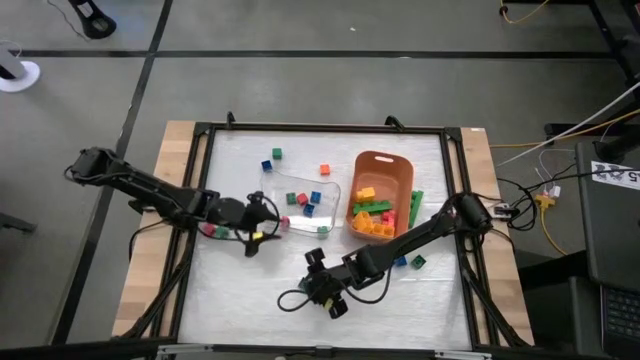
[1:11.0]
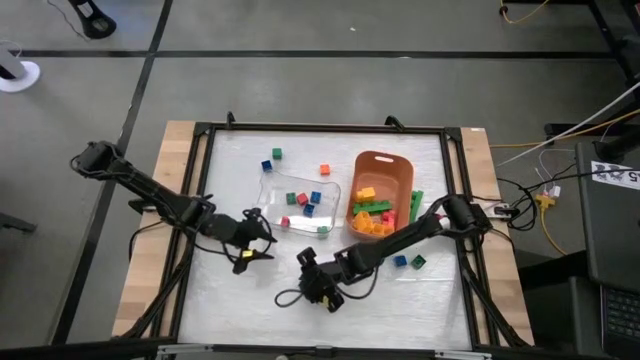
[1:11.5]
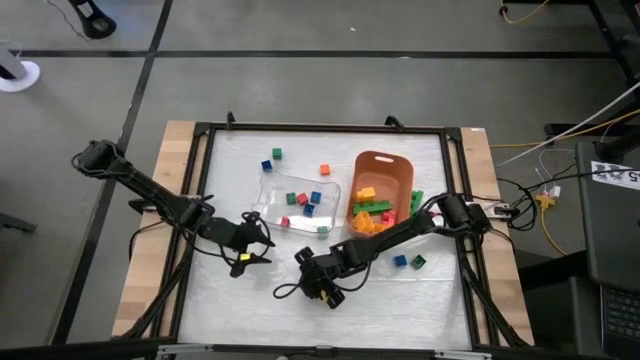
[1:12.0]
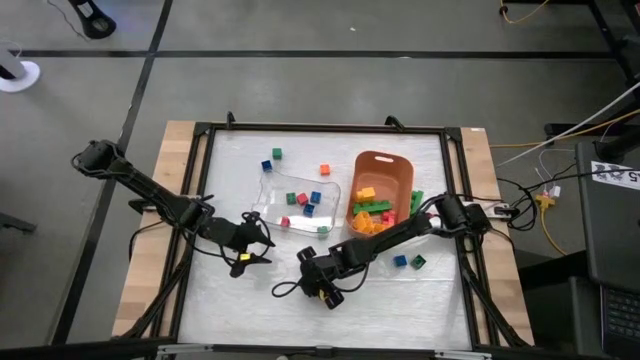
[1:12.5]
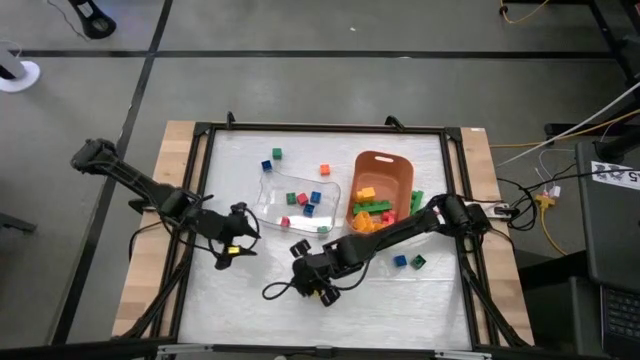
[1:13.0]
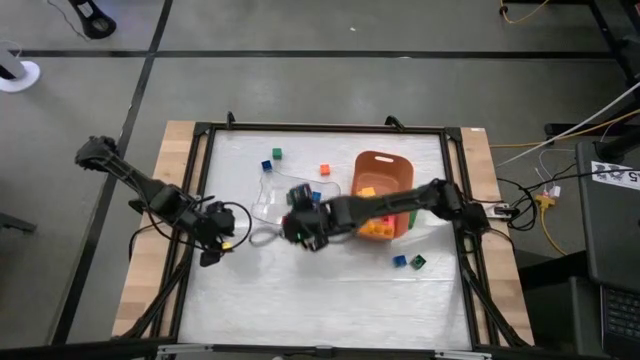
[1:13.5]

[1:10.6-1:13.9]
Task: Sort blocks by size
Put the small green game piece into the transparent bin

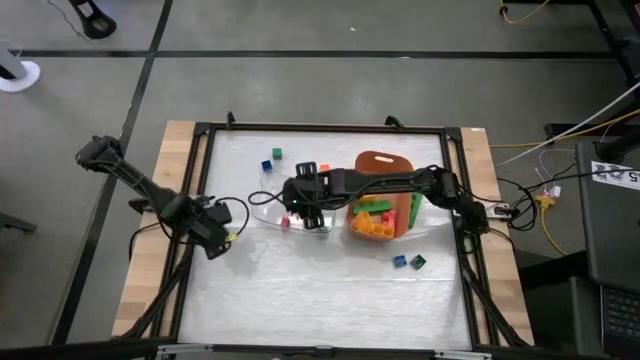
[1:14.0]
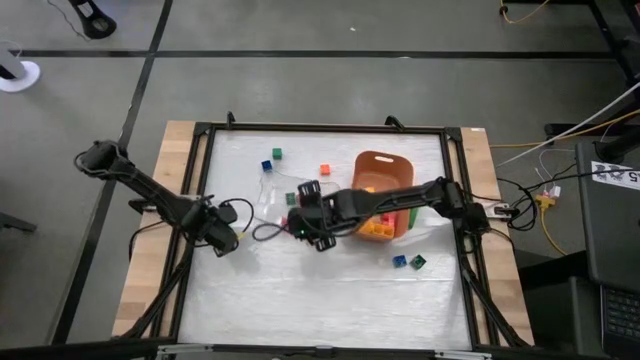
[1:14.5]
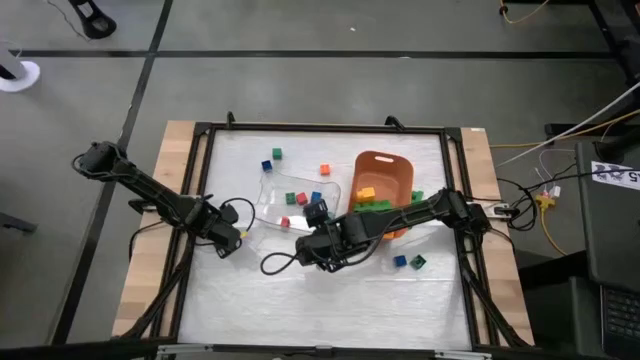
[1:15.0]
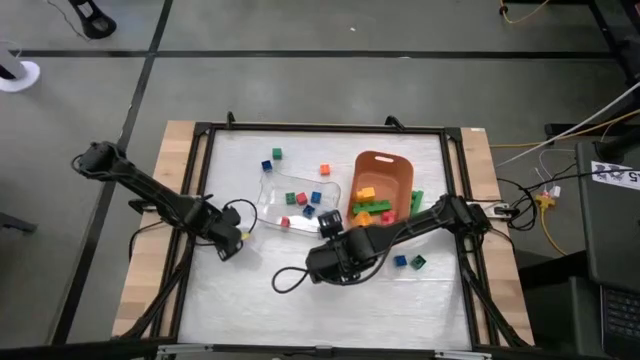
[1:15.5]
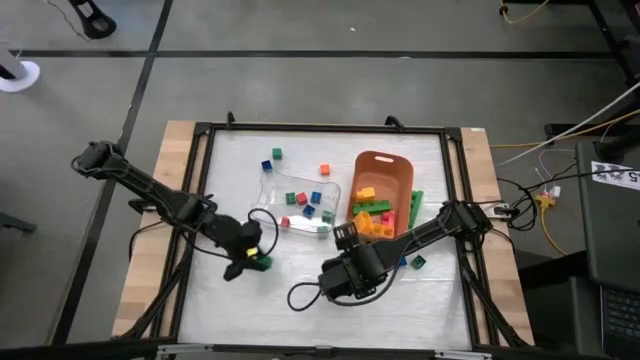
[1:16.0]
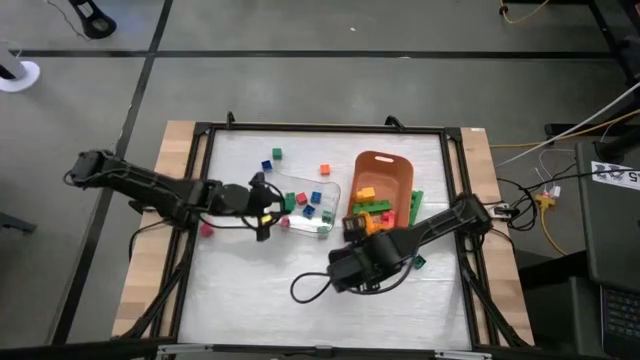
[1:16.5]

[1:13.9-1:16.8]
Put the small green block into the transparent bin

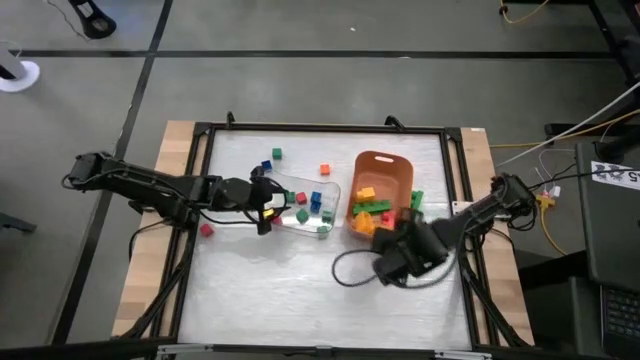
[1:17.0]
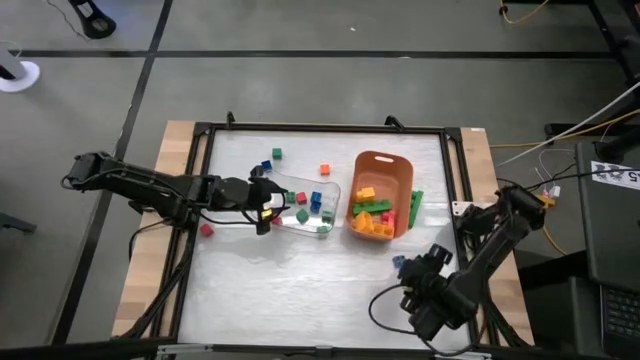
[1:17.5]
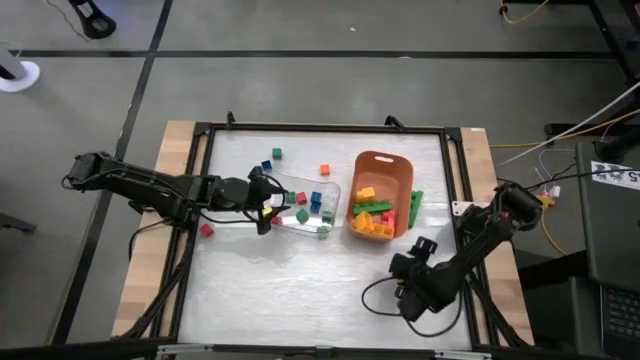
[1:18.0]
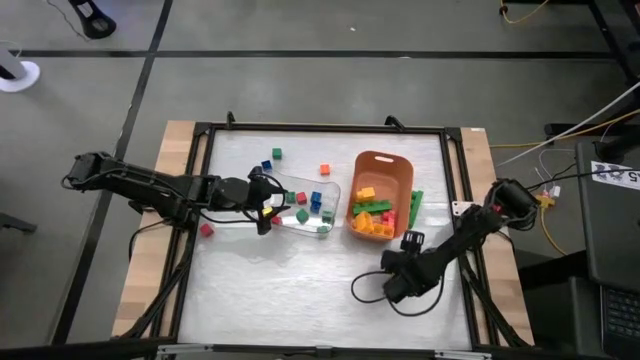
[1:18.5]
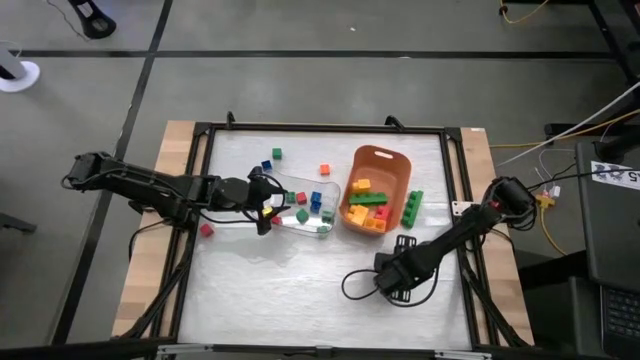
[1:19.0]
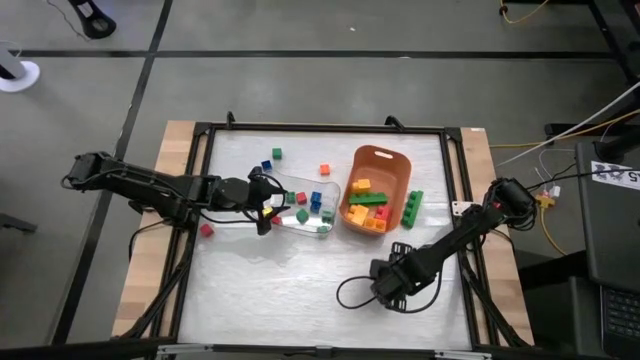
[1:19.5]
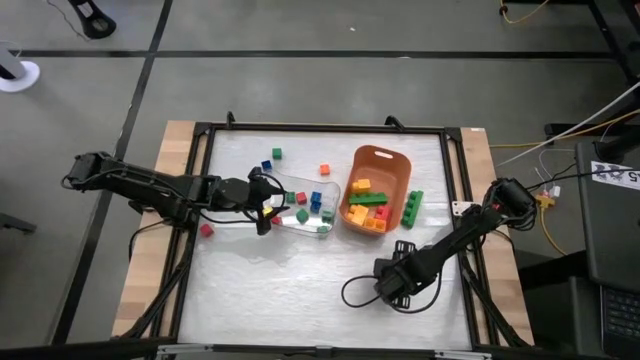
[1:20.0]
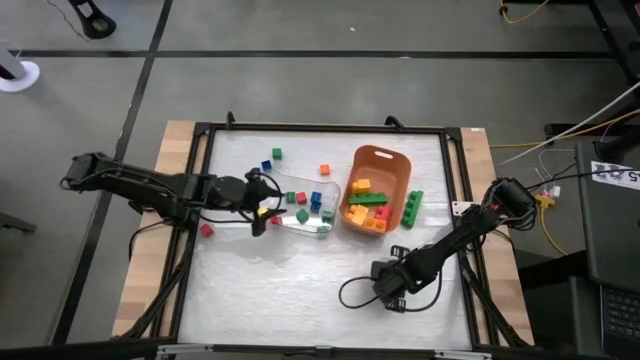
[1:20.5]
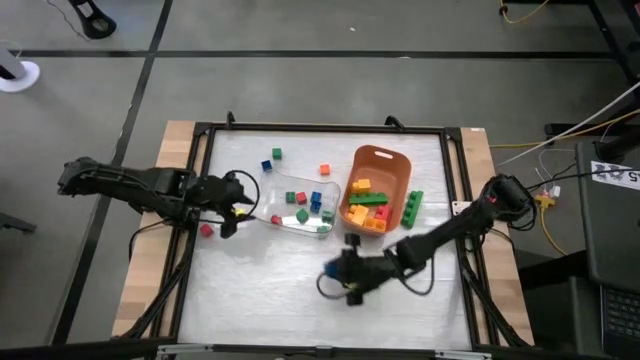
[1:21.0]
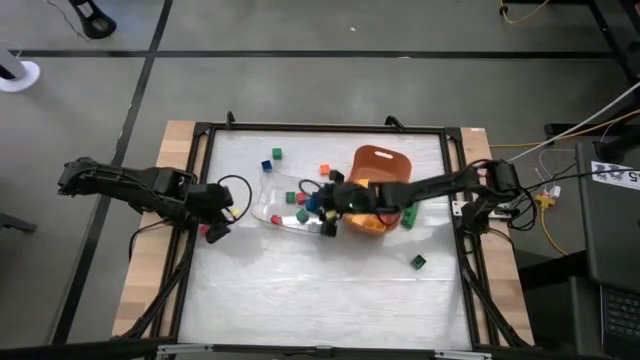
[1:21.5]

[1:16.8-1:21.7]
Put the small blue game piece into the transparent bin

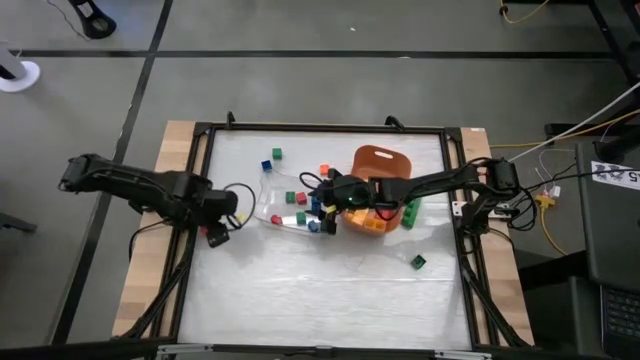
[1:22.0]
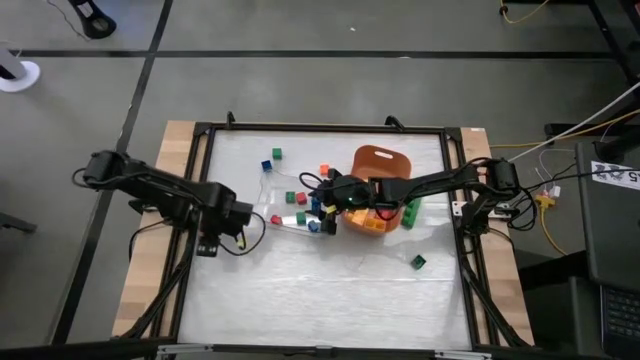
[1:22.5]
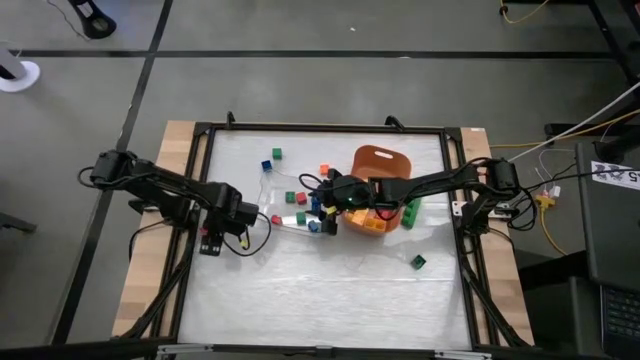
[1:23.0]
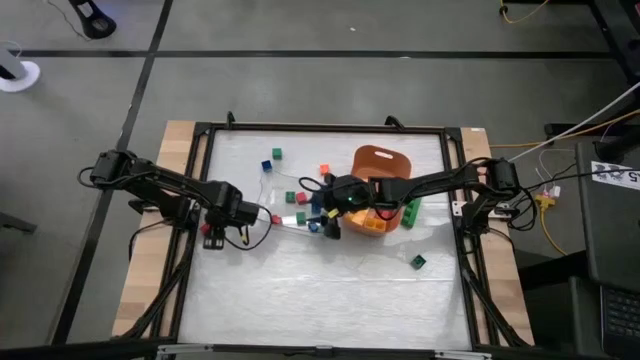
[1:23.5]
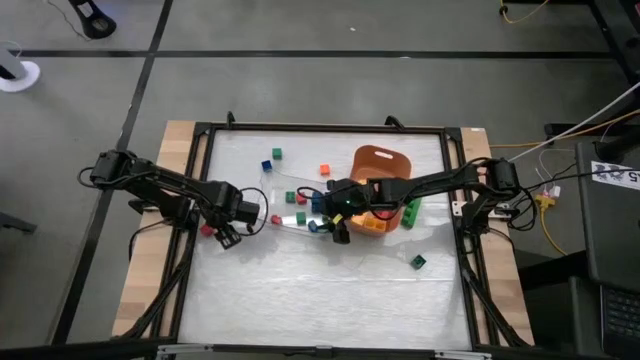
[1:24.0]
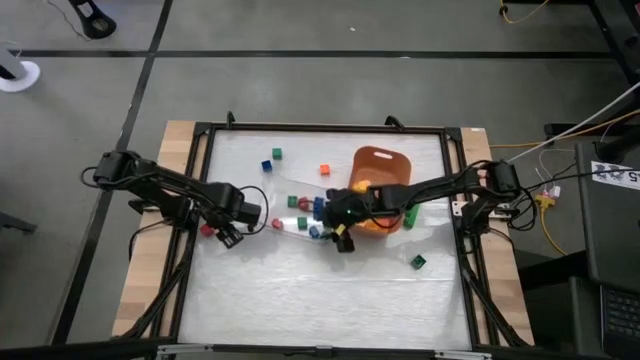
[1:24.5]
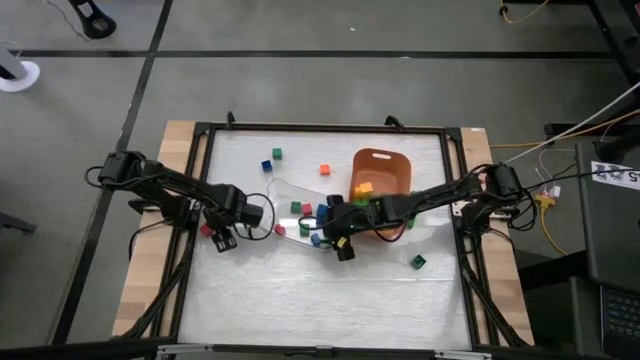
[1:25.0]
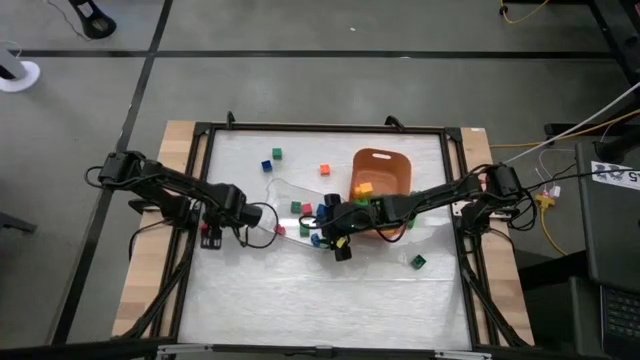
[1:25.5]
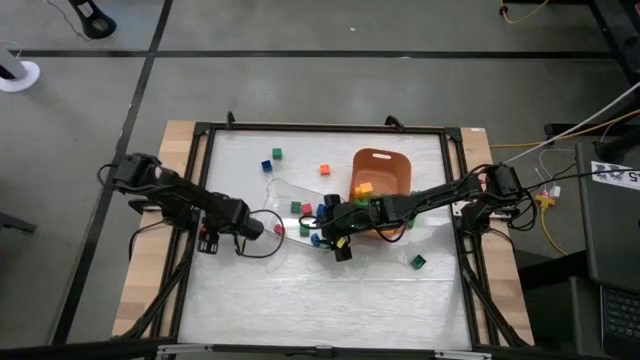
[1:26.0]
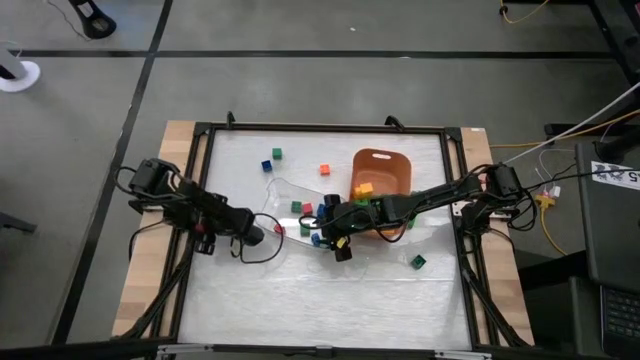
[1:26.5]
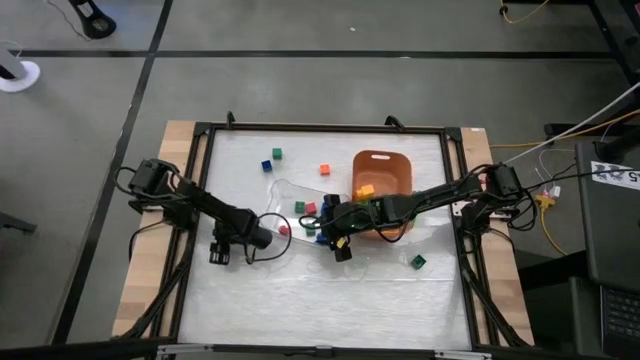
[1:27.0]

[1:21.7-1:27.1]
Put the small red block into the transparent bin

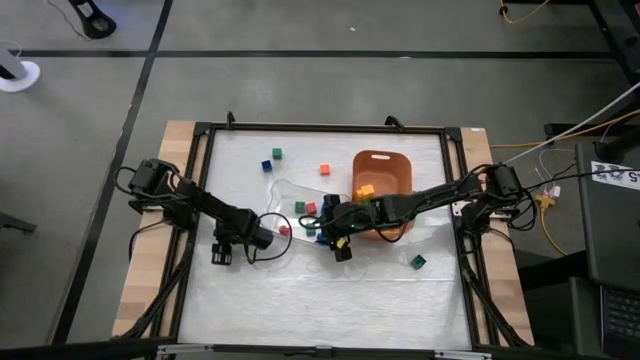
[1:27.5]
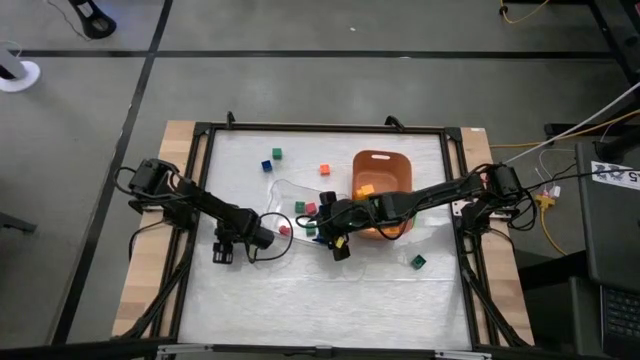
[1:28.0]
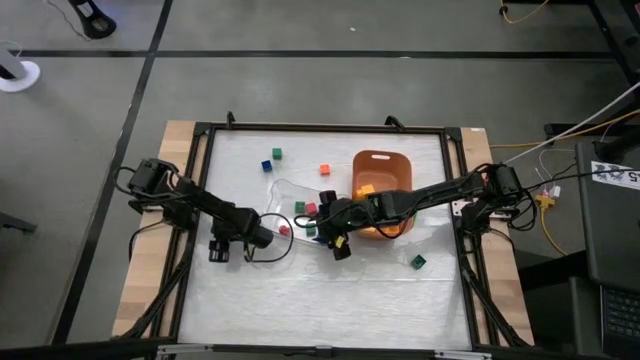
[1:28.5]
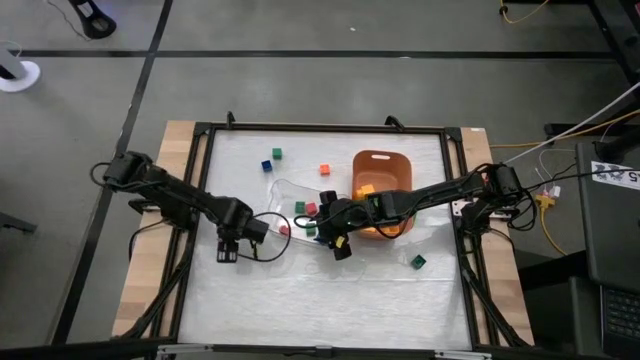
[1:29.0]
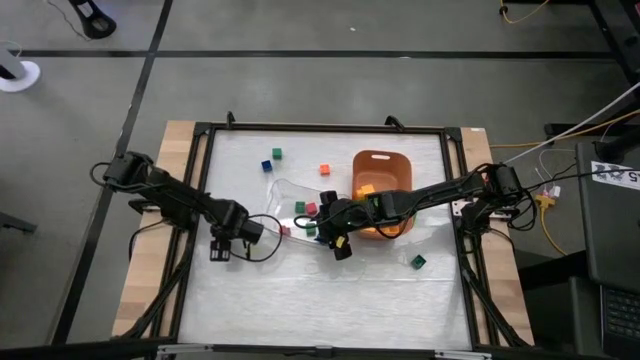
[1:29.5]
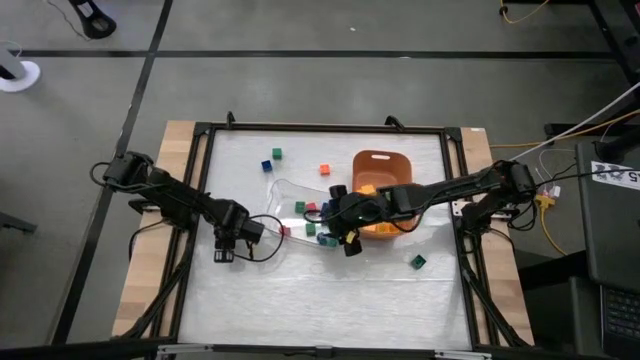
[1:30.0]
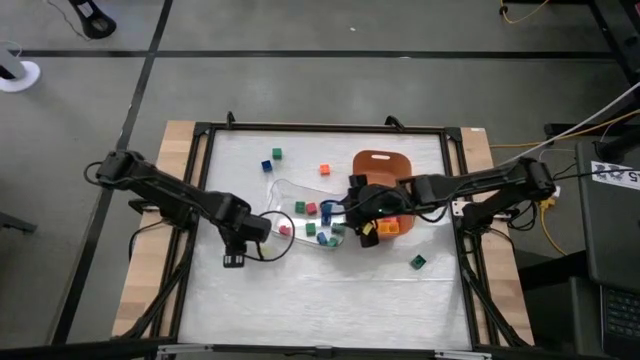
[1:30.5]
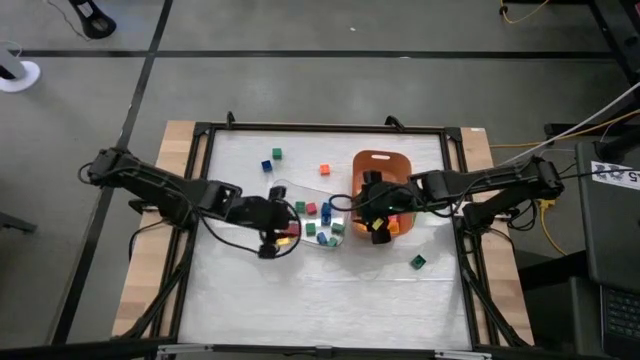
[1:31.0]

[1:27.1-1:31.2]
Put the small red block into the transparent bin

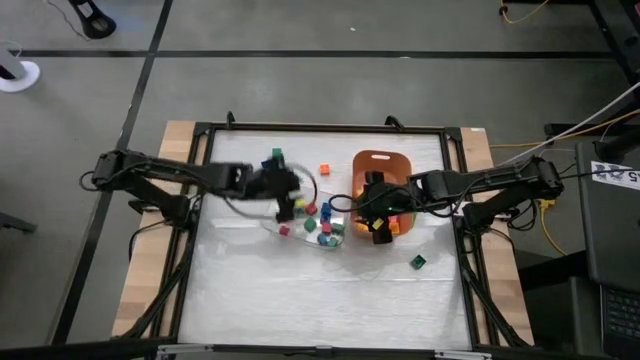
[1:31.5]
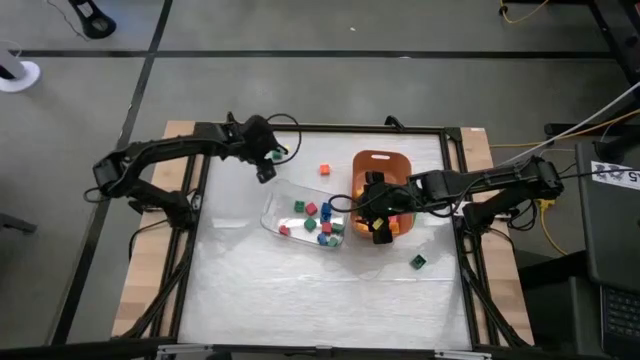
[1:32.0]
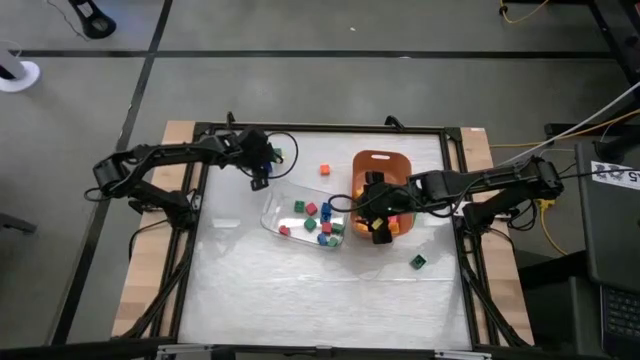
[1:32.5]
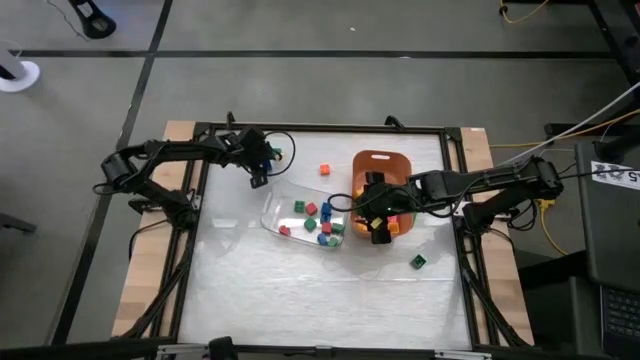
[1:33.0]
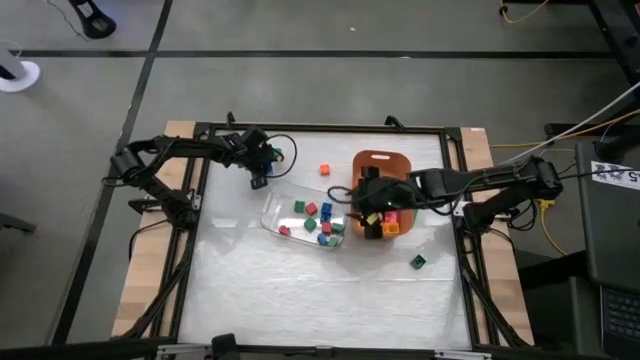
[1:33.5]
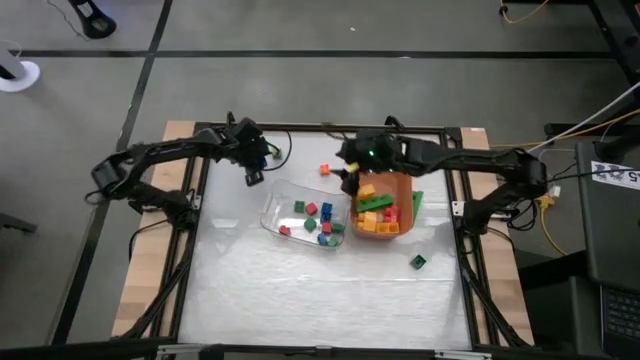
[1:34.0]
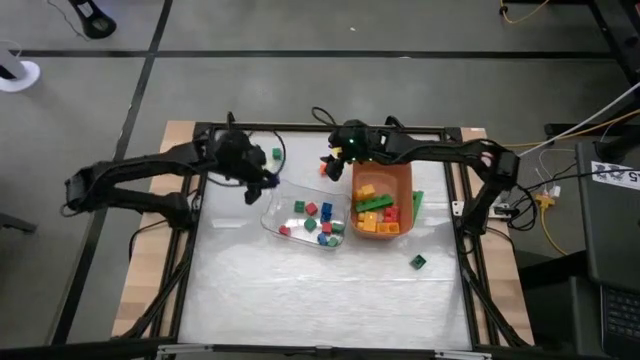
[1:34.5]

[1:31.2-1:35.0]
Put the small blue game piece into the transparent bin
